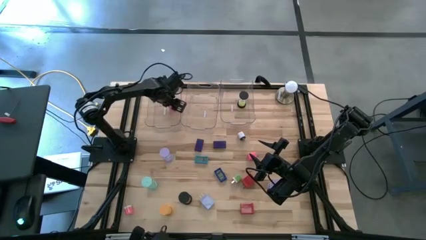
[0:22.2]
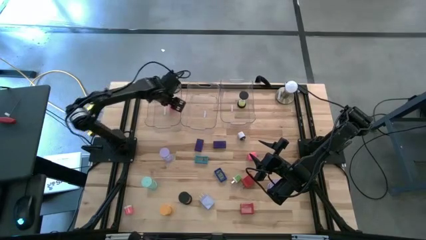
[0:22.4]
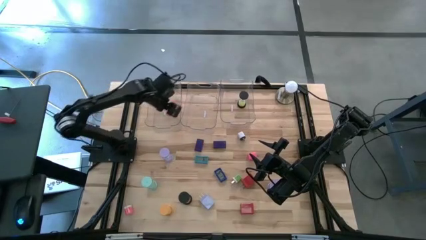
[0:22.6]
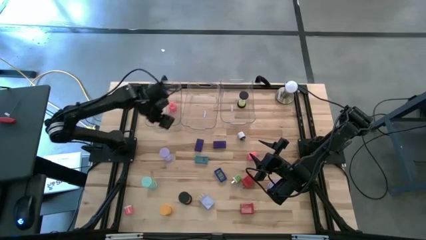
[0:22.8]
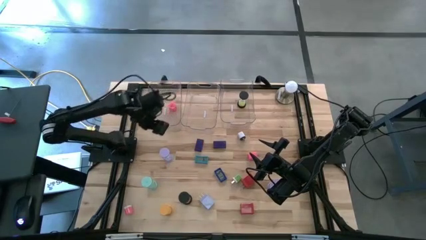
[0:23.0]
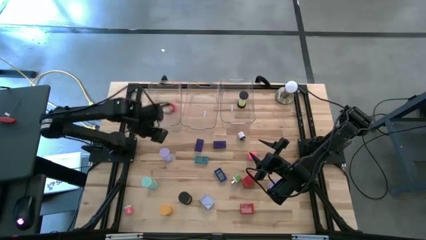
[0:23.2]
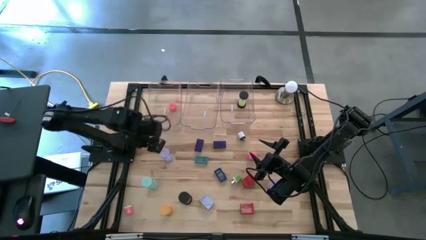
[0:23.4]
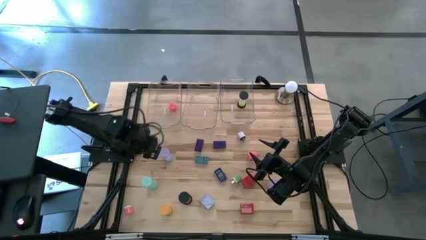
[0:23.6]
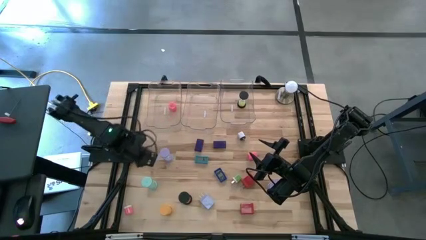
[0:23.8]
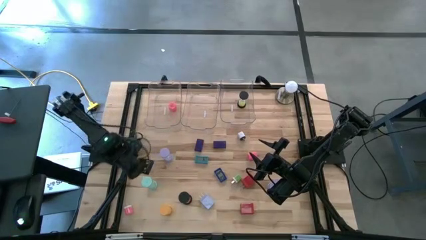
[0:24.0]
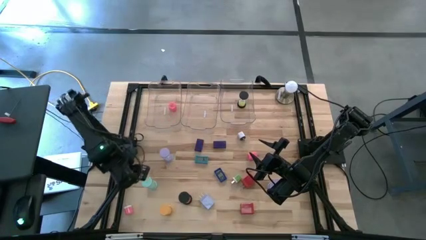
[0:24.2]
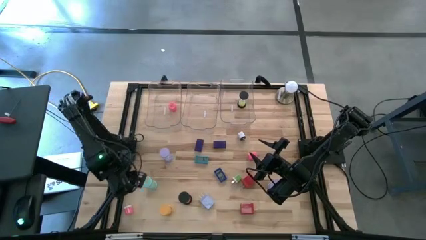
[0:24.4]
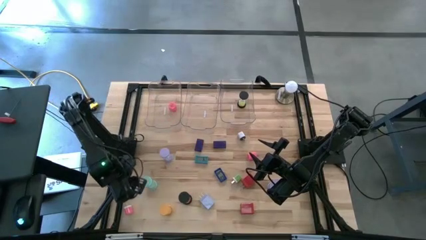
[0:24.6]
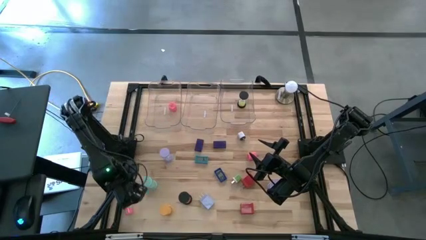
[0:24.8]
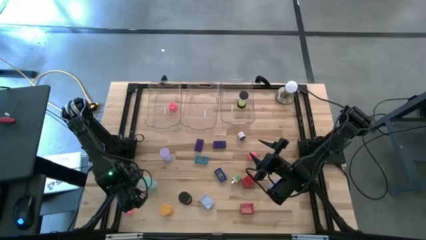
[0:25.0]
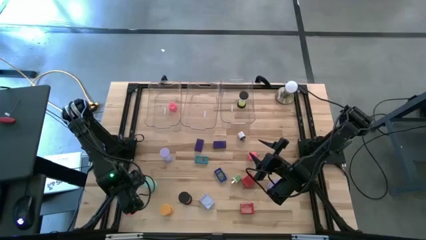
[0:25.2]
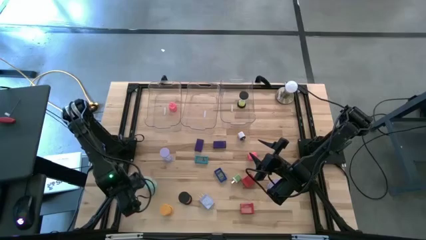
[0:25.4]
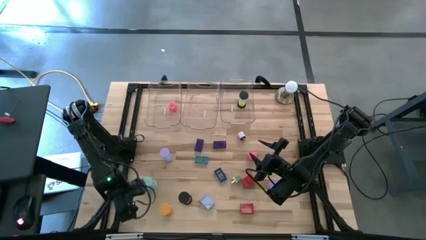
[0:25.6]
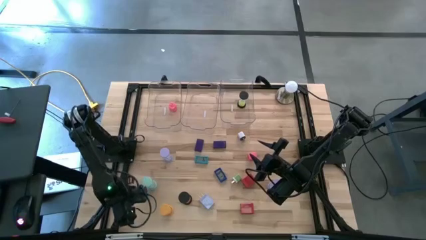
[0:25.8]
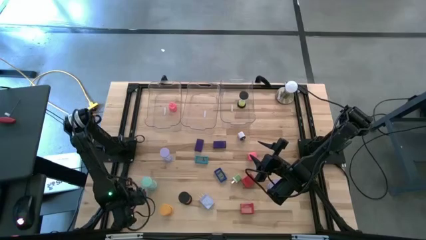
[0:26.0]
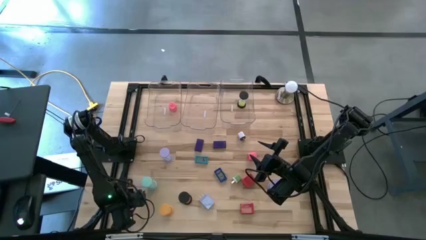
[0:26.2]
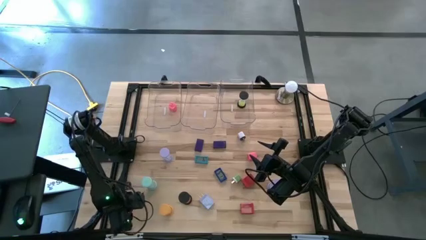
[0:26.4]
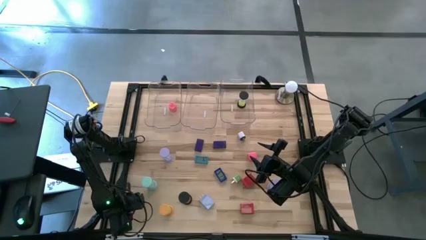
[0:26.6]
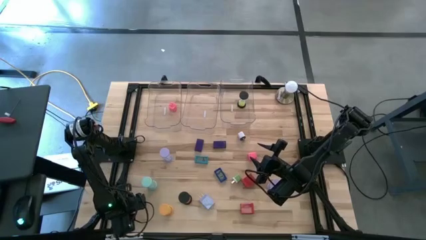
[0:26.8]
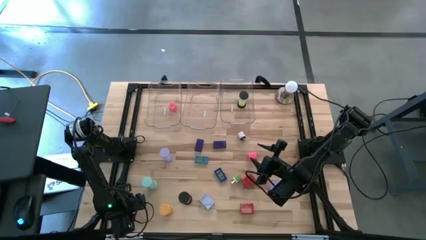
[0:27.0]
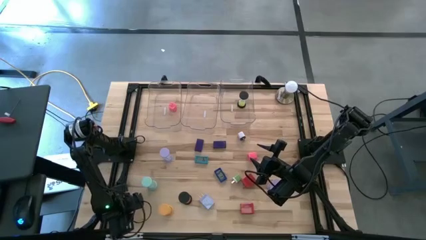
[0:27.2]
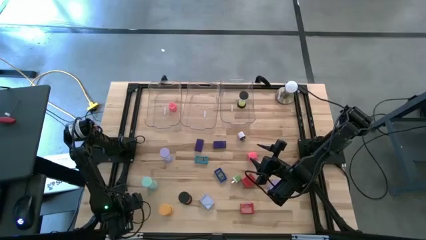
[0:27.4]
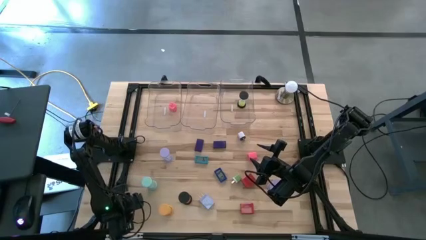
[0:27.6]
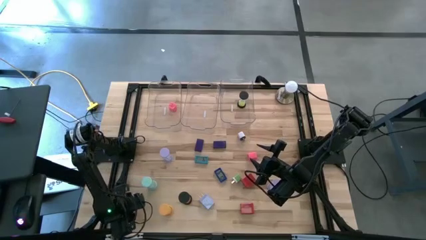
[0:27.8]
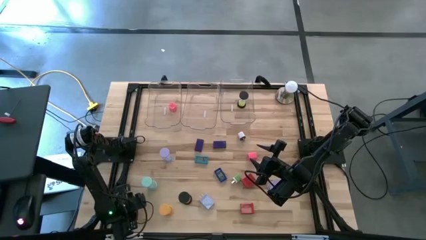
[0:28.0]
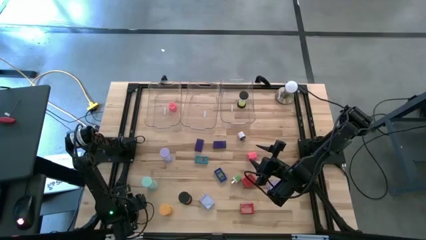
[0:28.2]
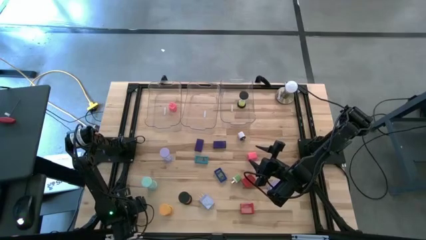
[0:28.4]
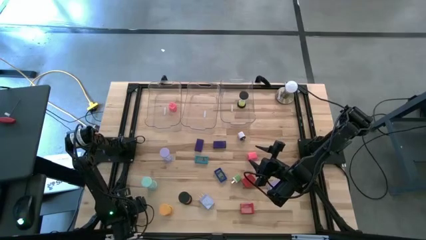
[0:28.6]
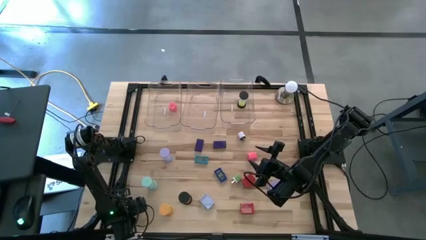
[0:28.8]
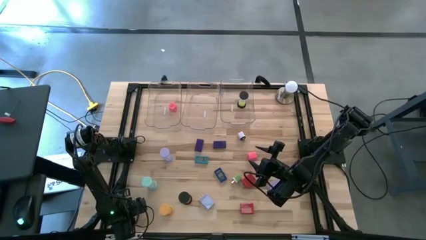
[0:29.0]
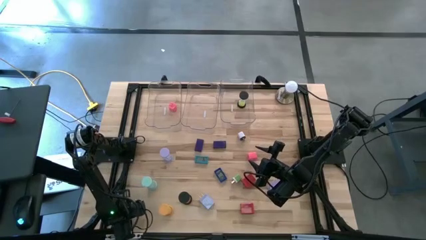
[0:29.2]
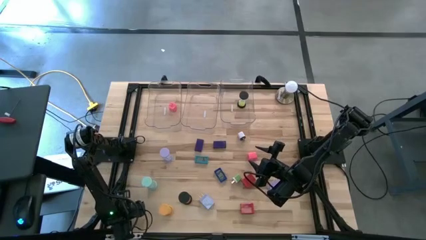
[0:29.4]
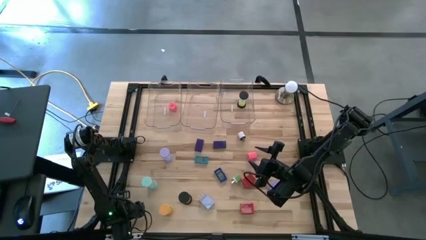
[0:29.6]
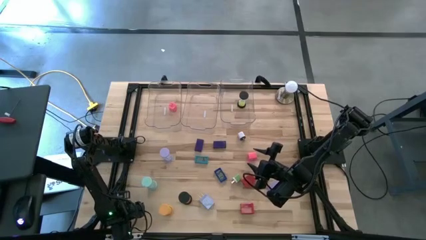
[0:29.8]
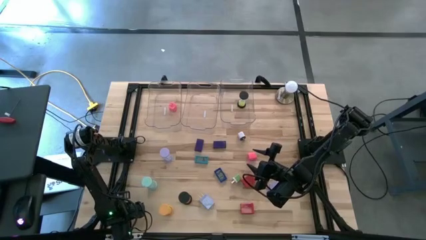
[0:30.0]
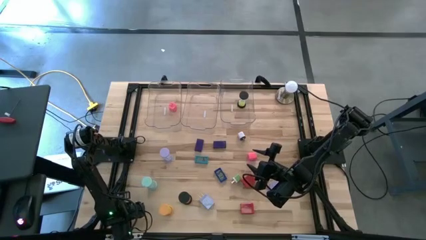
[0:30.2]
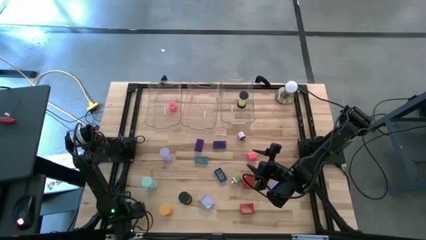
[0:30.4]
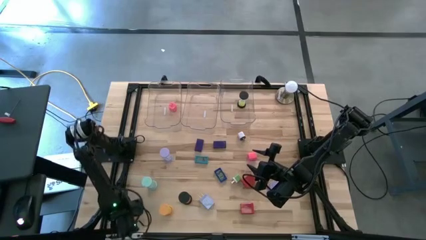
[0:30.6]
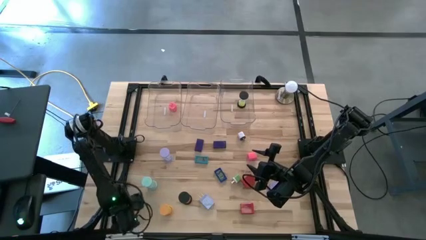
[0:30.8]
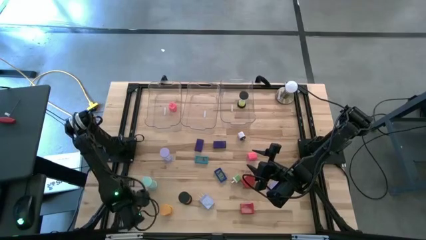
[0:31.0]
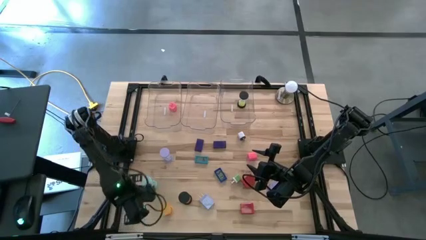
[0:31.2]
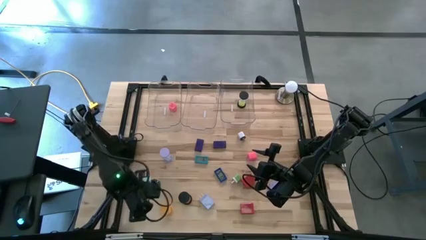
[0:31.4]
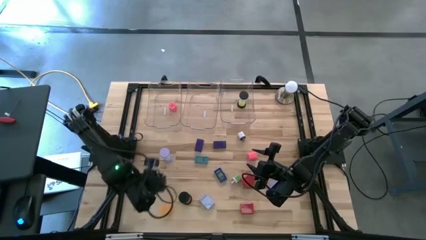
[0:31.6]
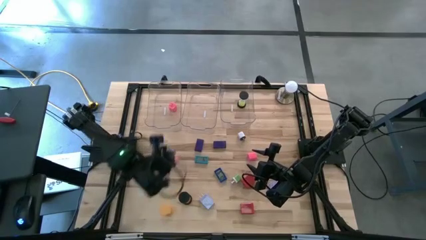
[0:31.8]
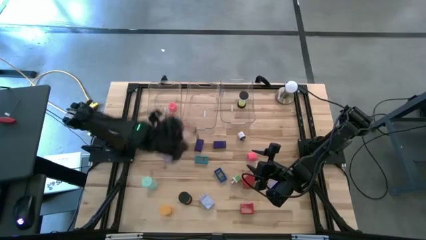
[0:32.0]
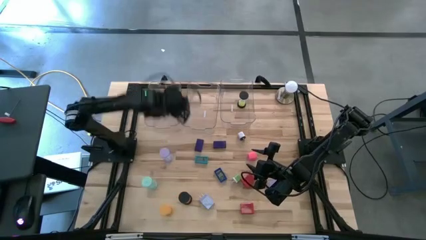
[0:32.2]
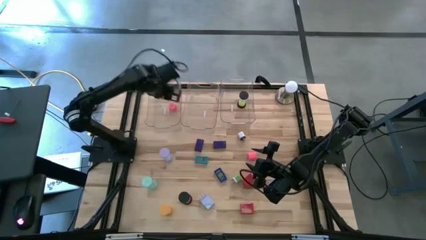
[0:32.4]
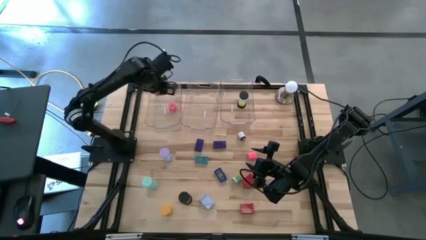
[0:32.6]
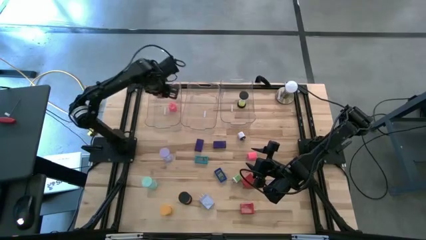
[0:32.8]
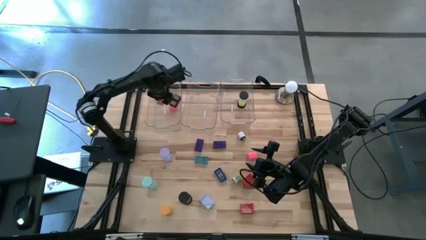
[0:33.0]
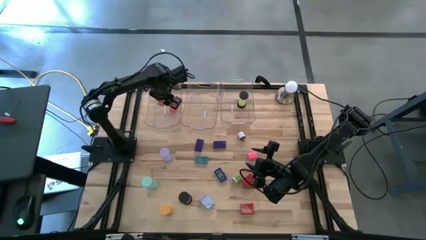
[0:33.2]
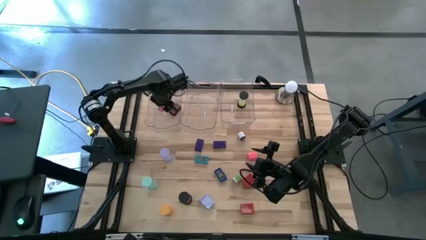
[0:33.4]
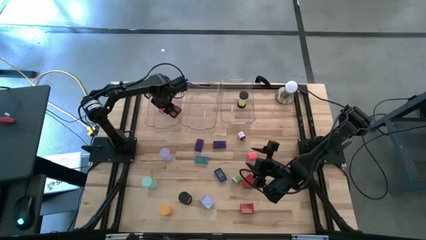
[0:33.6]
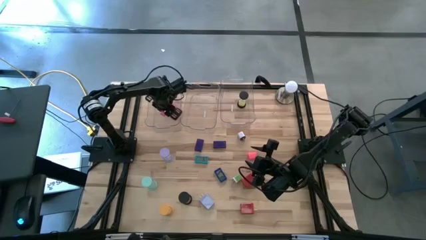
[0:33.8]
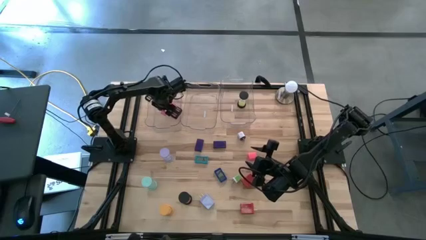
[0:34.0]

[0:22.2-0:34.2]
Task: Pick & Place Office items
Put the pink white charger adapter into the left transparent bin

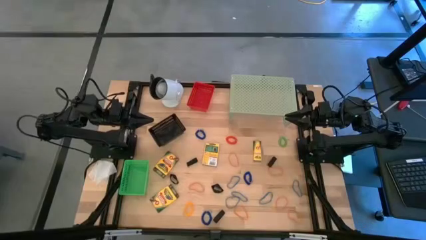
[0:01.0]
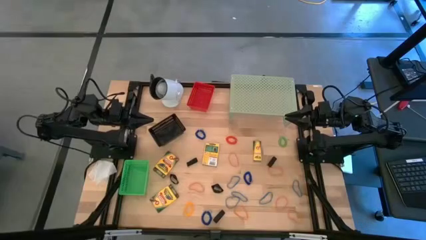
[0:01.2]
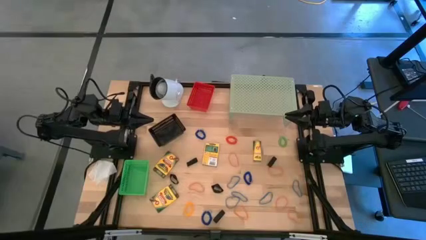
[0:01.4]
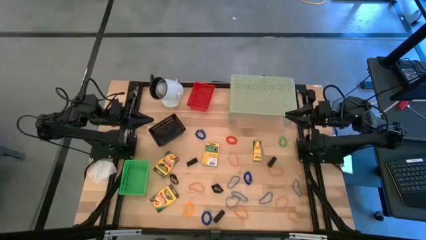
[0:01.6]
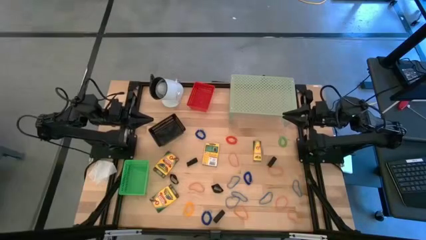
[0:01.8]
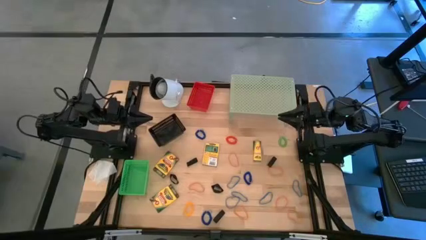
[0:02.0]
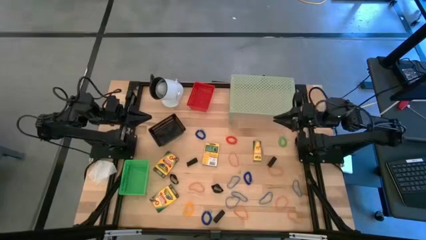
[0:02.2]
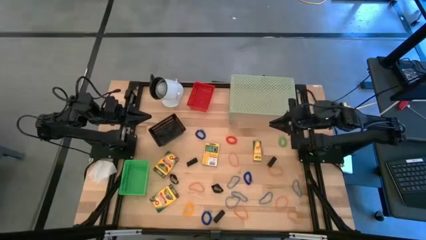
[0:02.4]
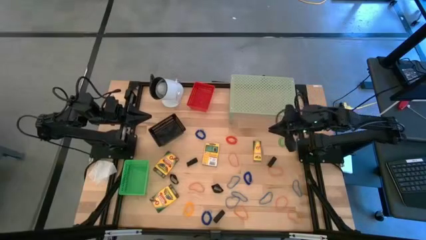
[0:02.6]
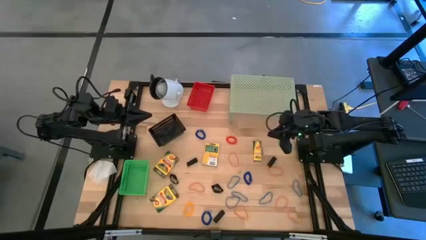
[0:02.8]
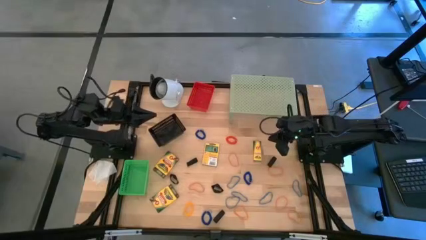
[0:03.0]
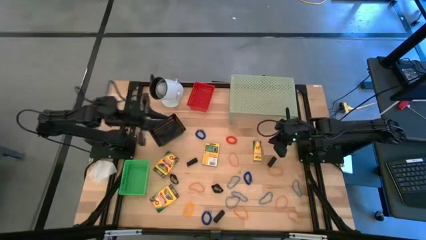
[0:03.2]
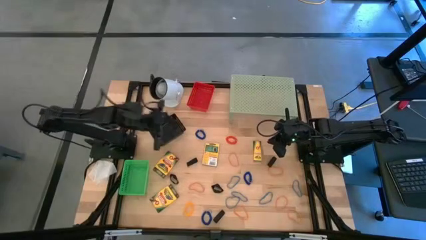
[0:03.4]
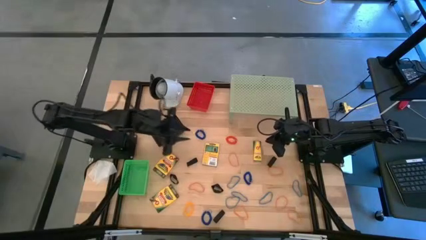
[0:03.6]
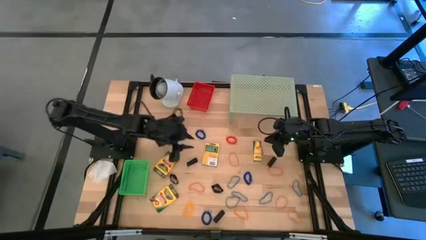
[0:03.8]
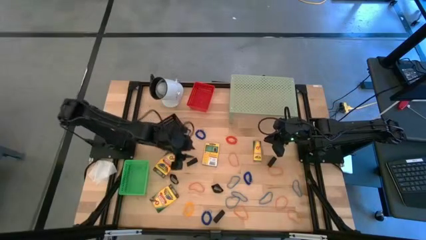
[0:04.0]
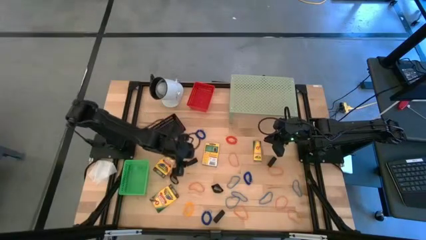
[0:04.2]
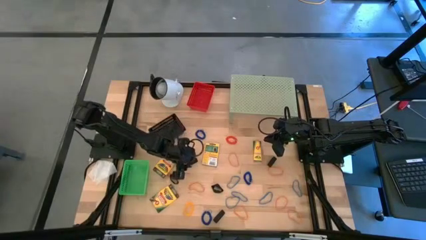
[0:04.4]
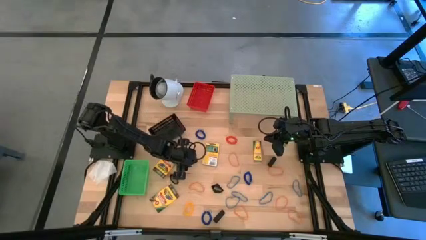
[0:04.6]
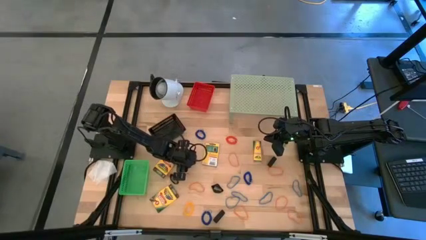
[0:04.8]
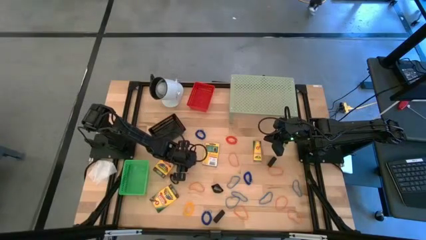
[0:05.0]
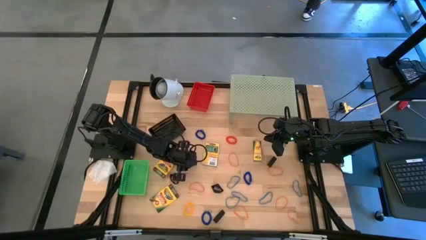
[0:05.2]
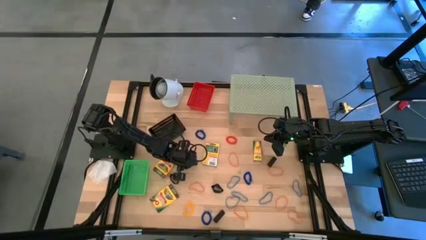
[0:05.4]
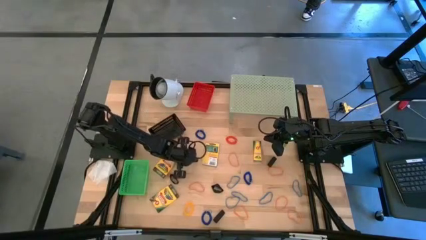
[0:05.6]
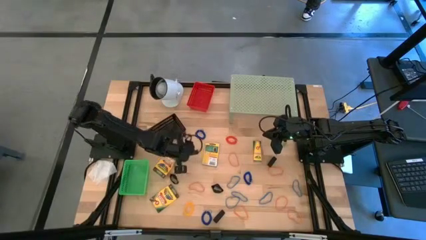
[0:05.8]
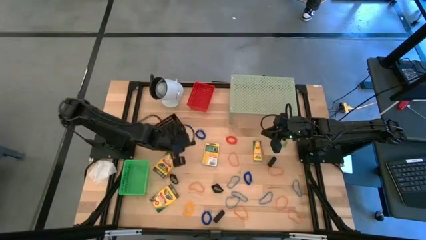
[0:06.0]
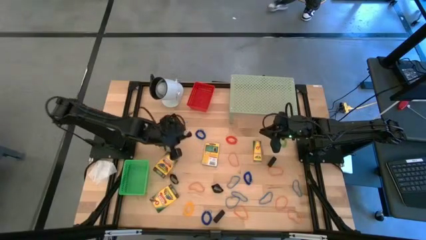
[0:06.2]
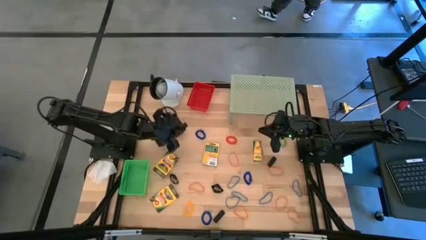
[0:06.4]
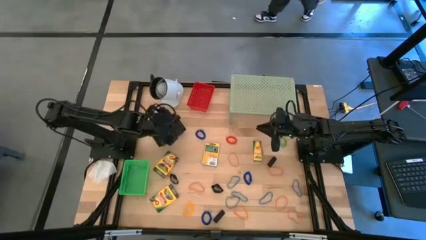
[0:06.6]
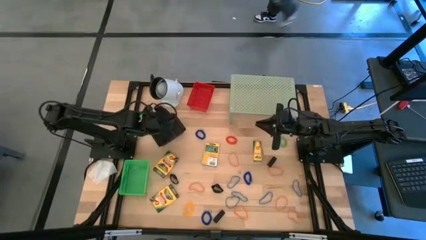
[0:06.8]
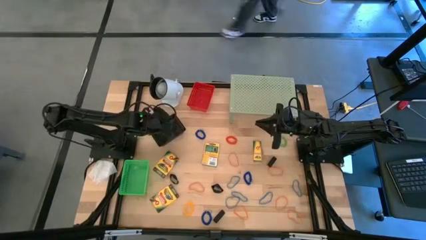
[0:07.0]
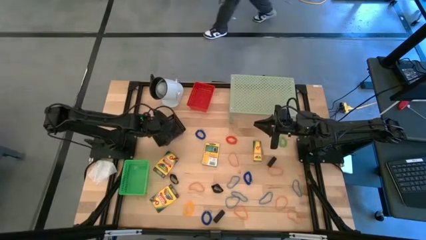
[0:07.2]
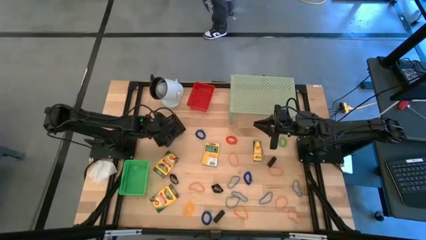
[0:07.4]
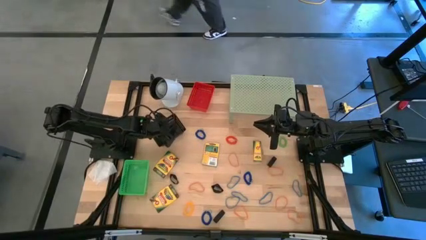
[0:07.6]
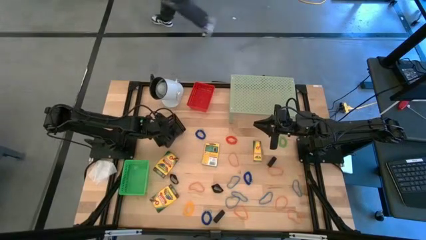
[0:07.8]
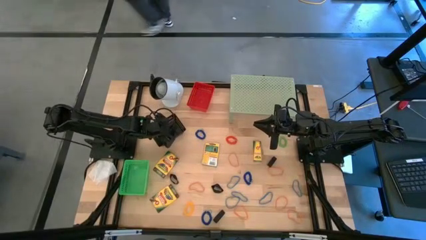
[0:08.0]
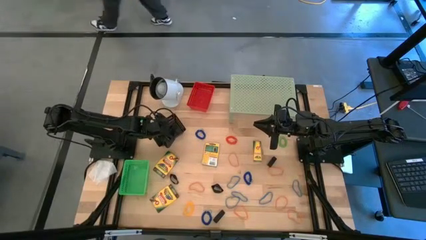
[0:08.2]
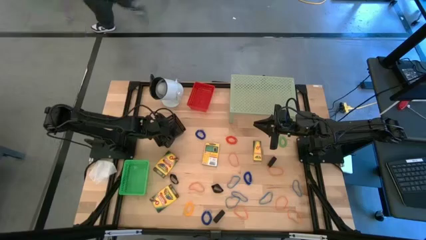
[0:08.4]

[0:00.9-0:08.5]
Task: Pick & Place Office Desk Supplies
Put the black rubber band into the black bin
